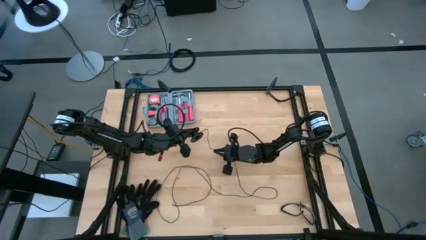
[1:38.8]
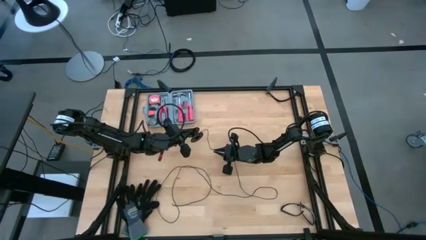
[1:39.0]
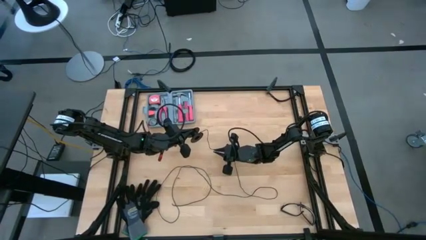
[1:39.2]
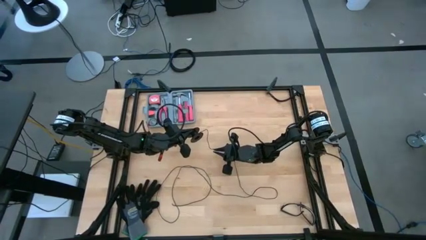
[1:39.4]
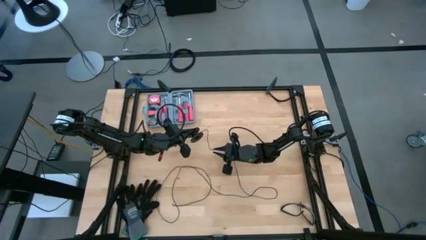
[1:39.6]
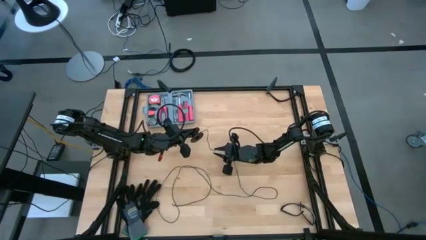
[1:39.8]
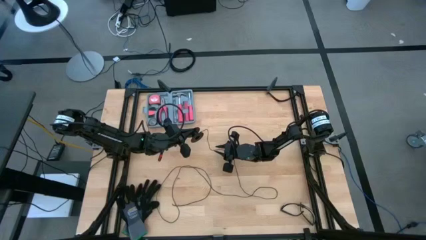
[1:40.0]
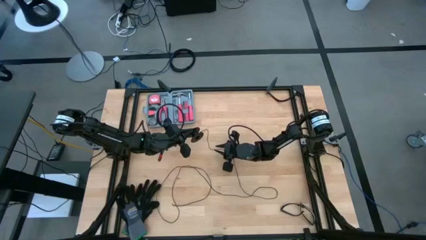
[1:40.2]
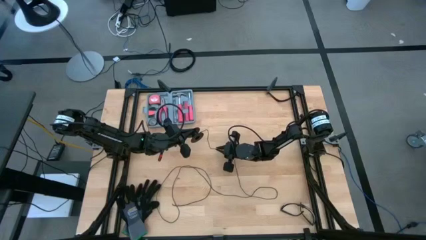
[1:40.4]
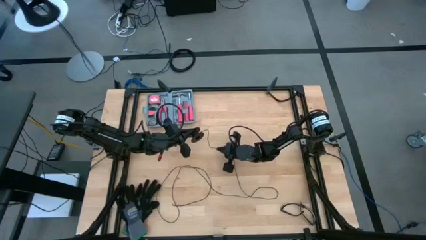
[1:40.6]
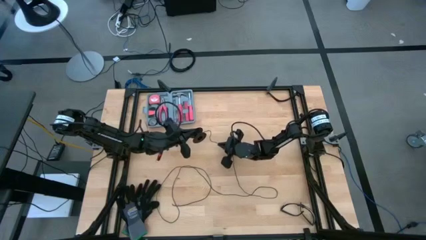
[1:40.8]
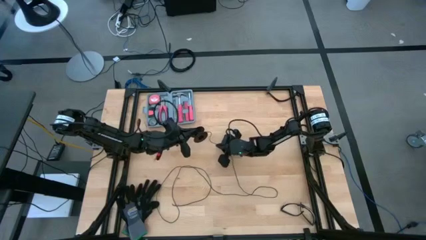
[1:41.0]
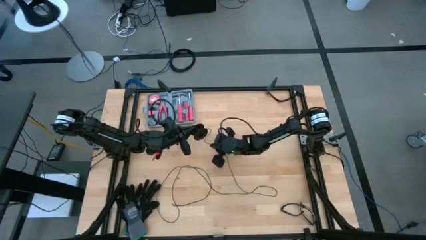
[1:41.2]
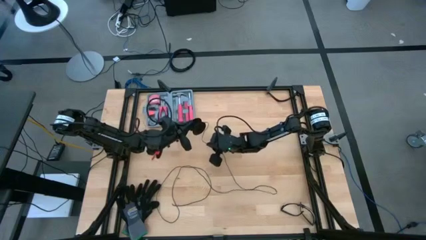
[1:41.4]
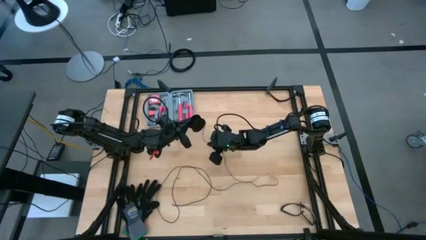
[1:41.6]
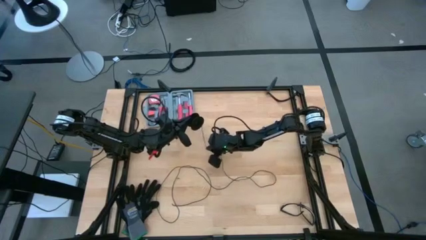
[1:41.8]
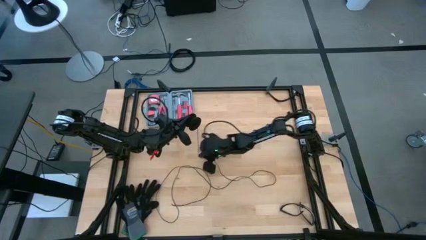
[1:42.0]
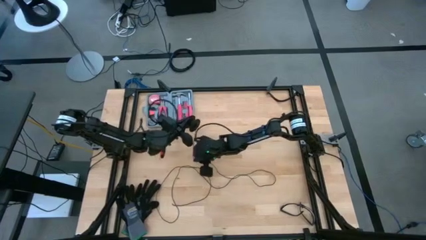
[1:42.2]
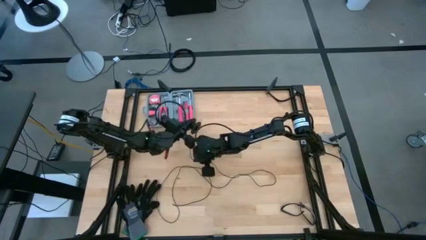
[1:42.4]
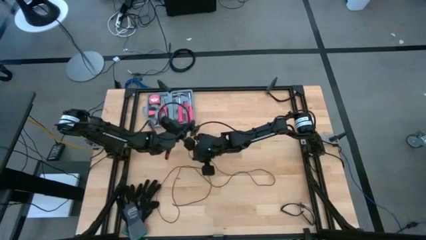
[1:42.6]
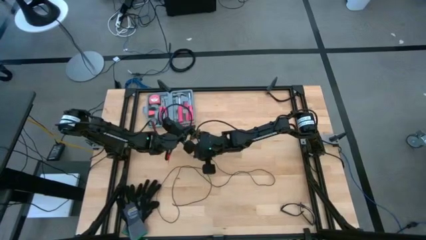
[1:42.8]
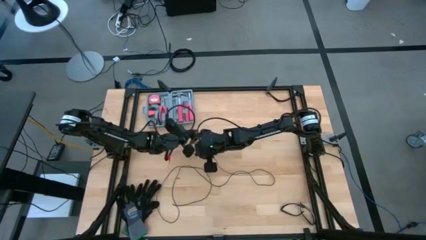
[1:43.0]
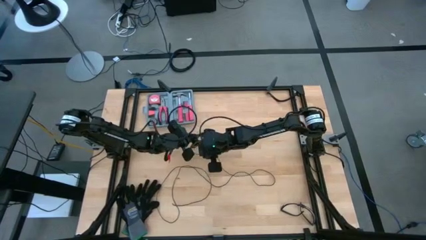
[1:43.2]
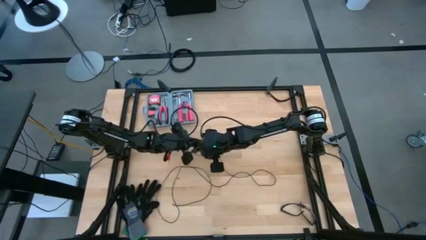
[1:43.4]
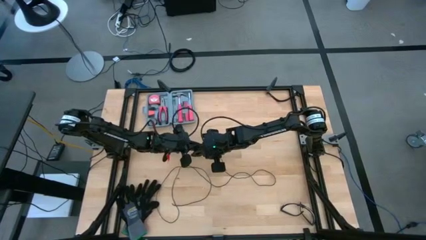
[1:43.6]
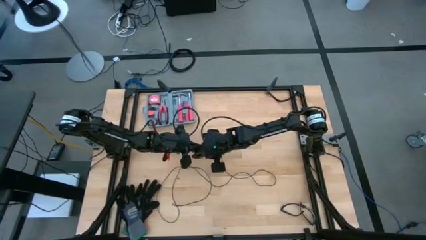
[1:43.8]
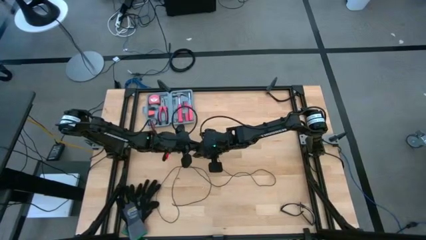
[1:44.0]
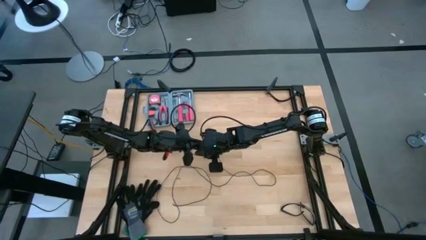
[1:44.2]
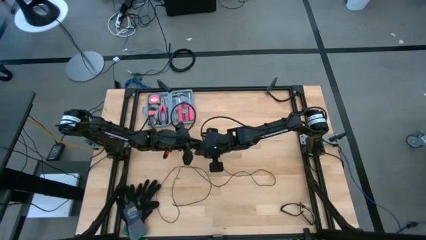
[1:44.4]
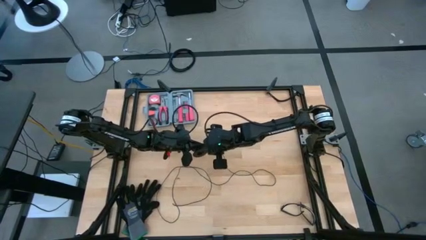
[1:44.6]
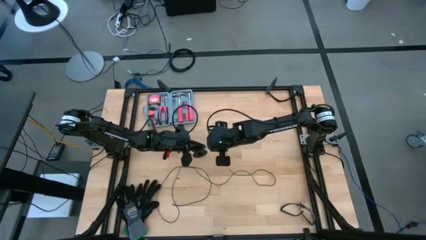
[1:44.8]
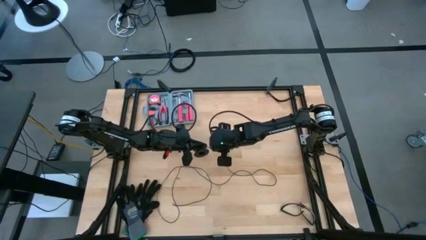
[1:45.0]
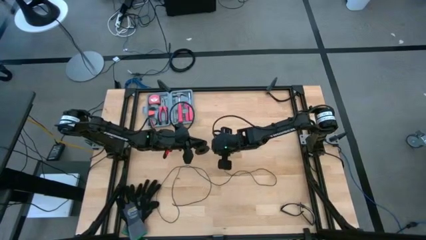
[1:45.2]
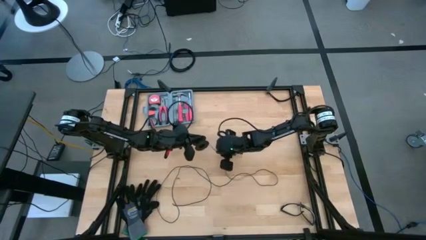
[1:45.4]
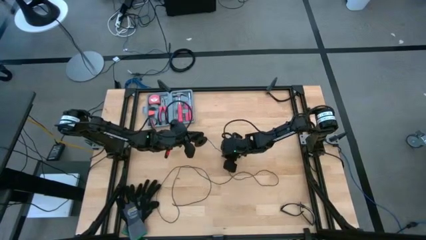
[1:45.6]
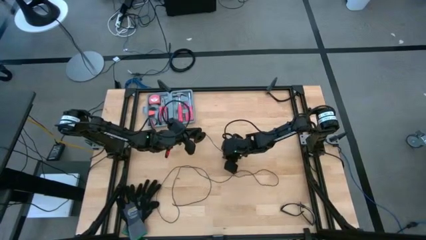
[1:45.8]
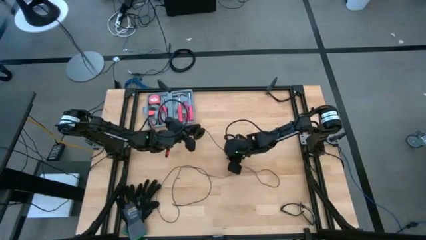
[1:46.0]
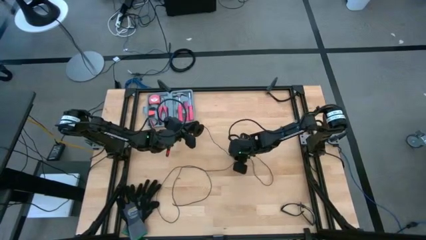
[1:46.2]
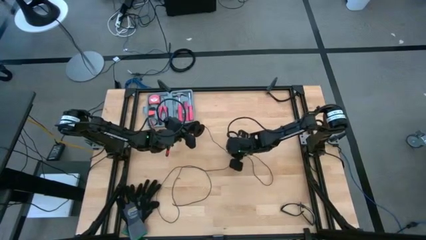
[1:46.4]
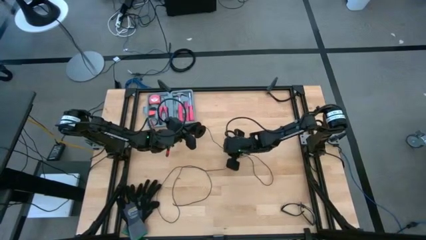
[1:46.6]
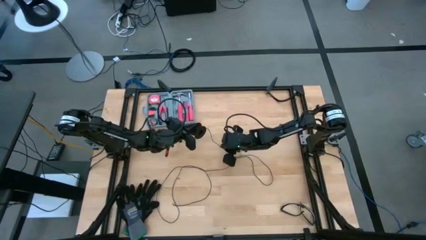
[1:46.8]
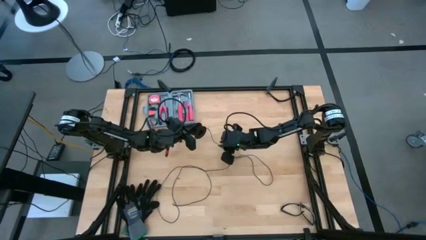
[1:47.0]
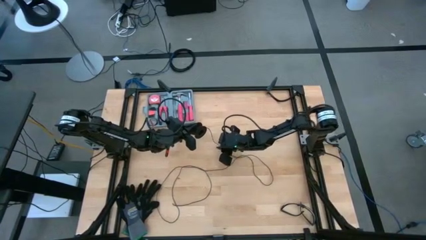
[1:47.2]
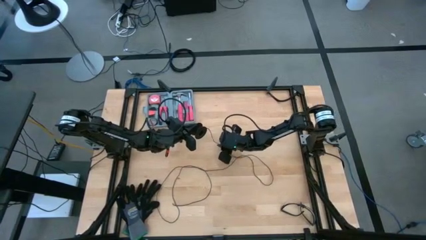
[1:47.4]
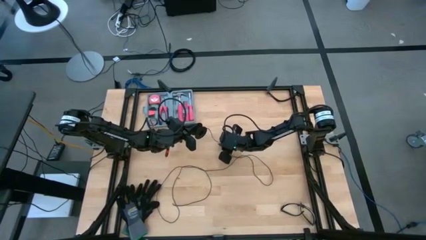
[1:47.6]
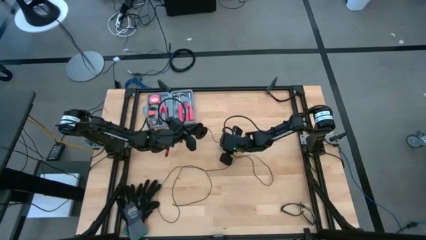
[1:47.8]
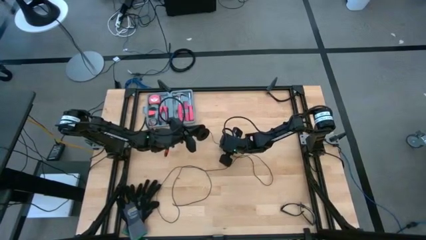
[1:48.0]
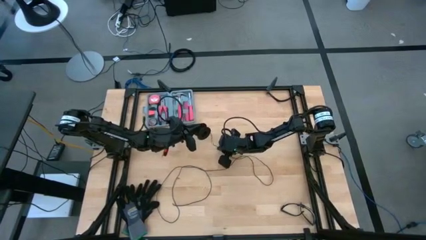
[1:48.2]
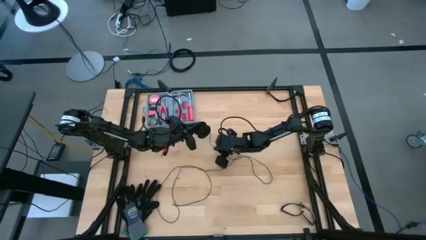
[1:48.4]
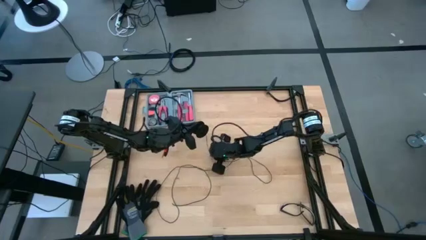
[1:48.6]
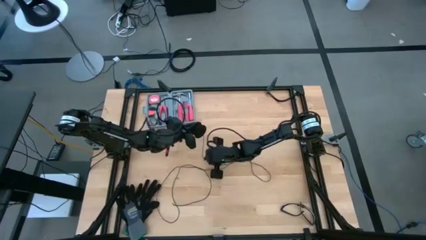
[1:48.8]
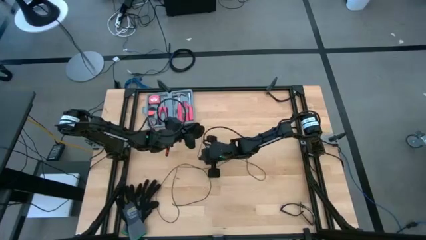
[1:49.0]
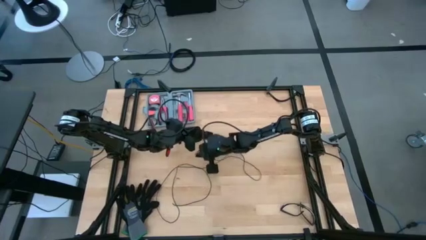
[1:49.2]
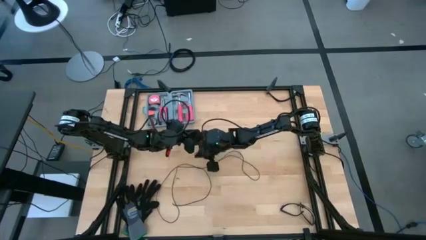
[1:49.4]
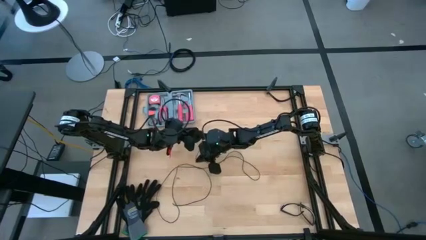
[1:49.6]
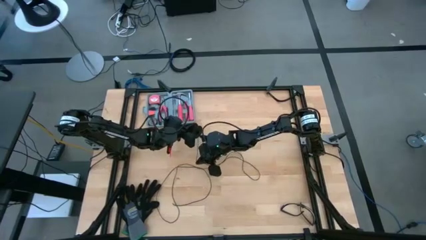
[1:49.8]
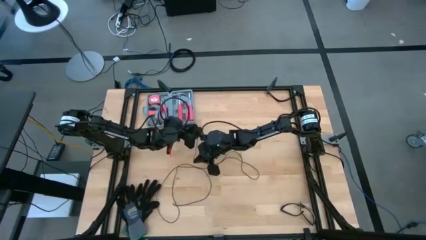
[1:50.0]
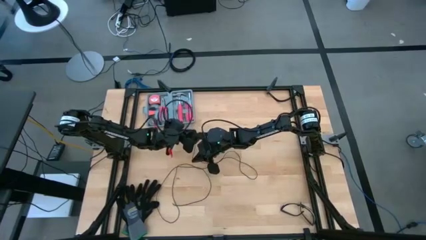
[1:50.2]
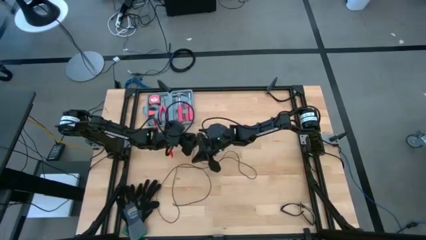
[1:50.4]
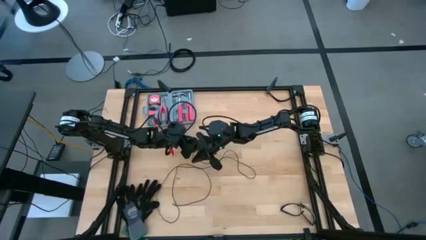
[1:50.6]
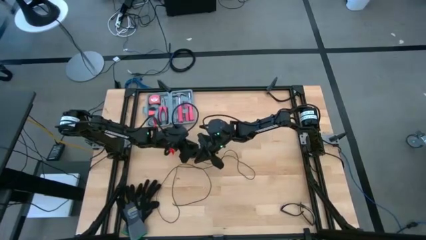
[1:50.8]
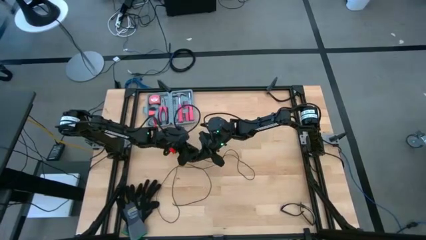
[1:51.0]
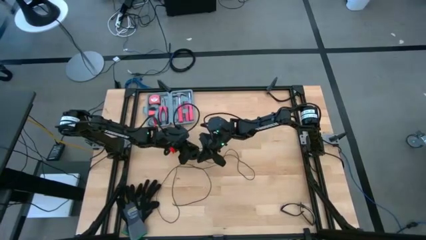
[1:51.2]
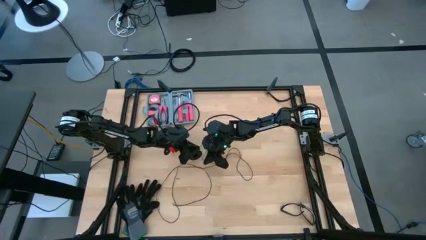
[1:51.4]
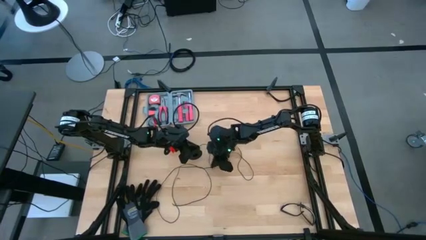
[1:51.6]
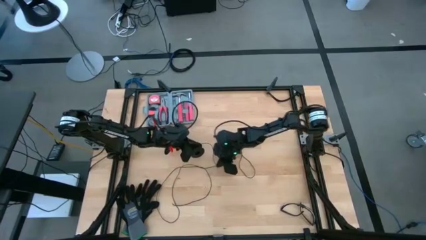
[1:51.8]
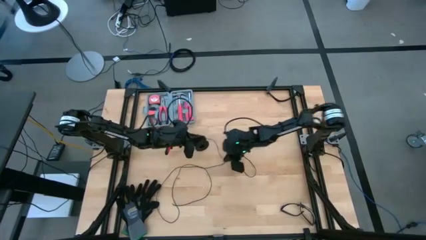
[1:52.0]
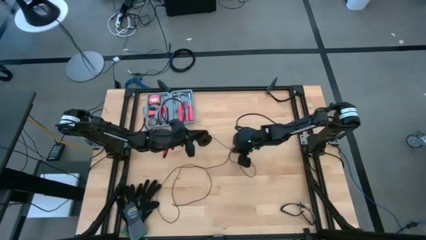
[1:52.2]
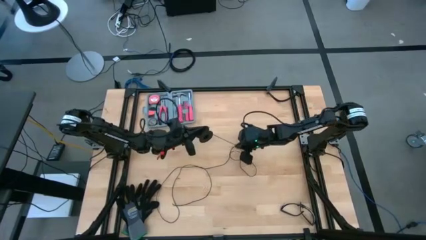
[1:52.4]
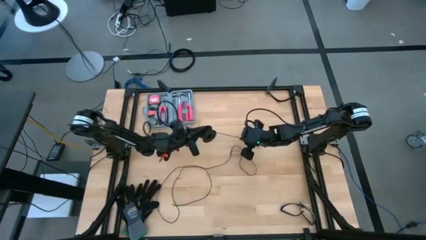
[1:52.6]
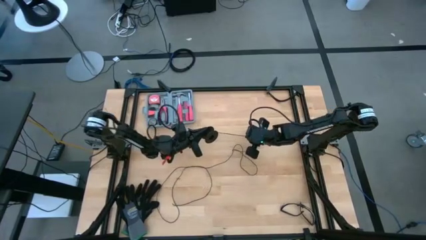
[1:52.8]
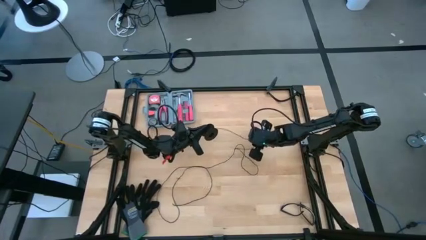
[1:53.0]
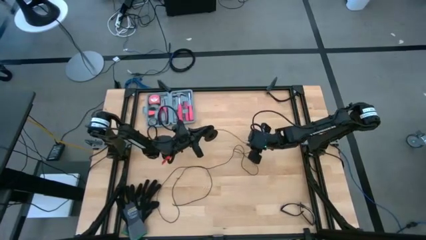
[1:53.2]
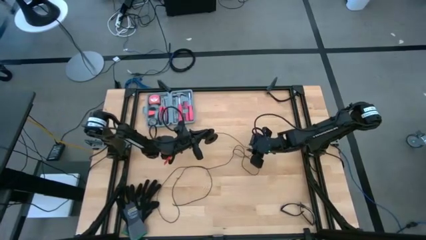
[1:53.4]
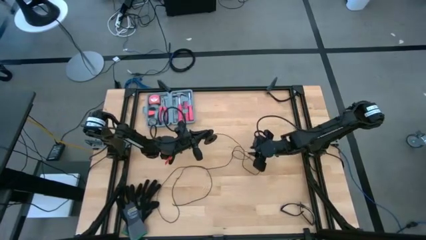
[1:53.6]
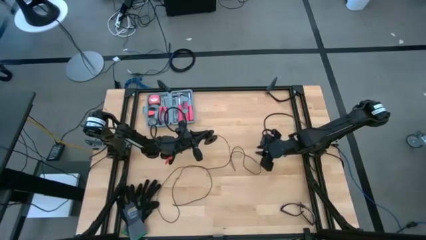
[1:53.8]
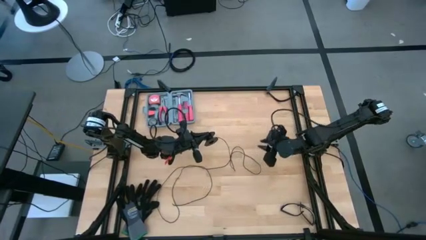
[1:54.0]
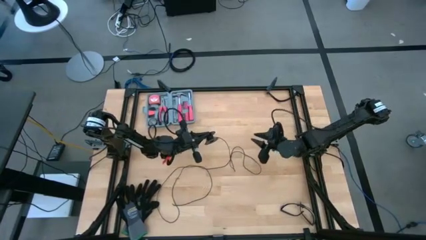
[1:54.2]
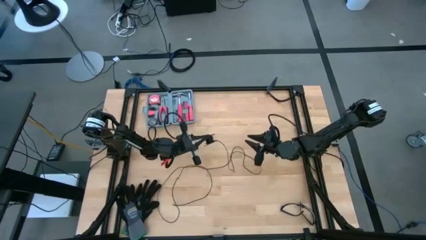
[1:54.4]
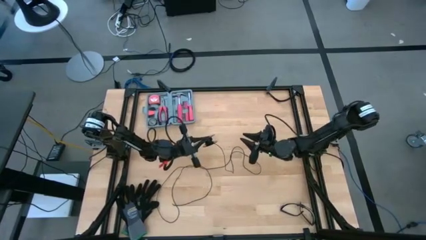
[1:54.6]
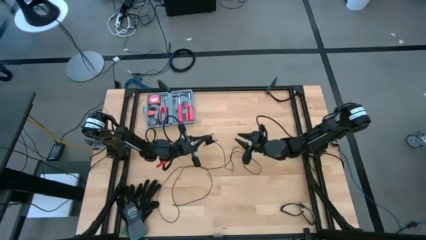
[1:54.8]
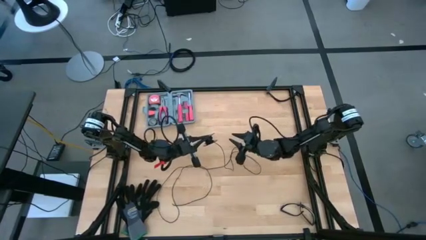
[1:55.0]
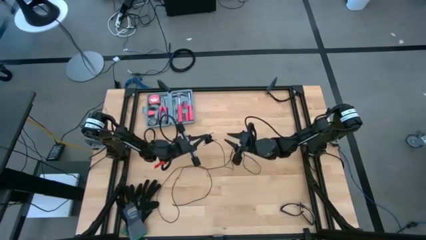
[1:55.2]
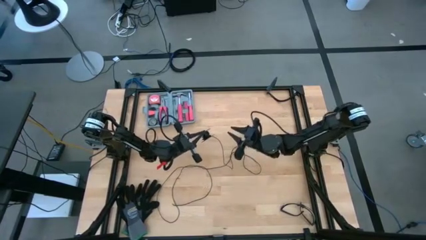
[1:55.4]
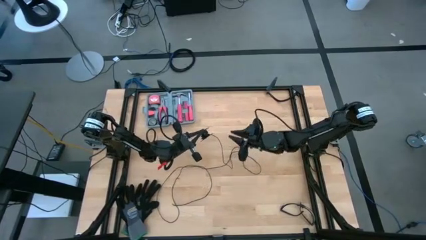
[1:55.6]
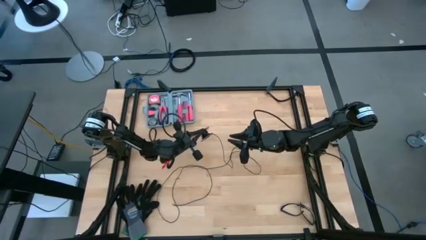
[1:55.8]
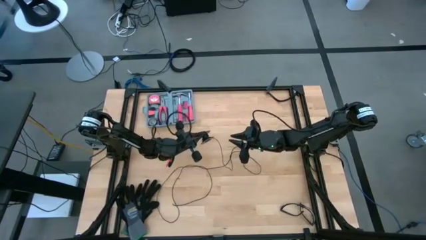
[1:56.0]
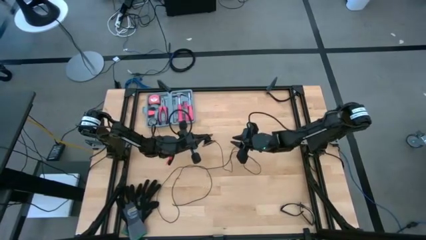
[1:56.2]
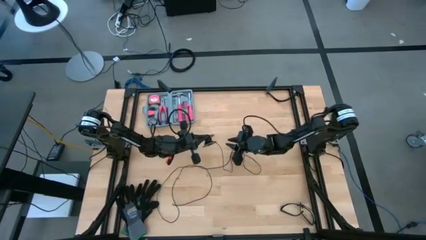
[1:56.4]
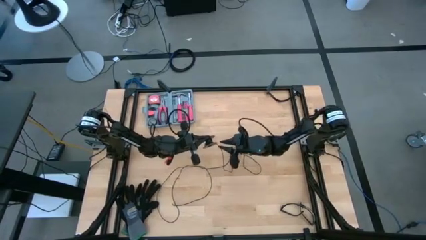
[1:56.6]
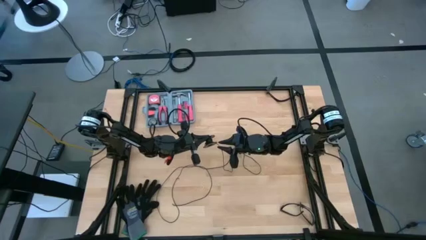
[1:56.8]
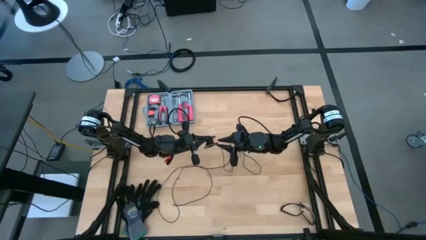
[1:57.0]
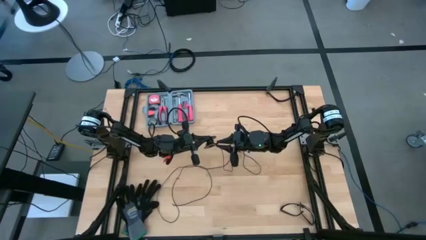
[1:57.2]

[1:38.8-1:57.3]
Task: Coil cords
Coil the black wire onto the spool
